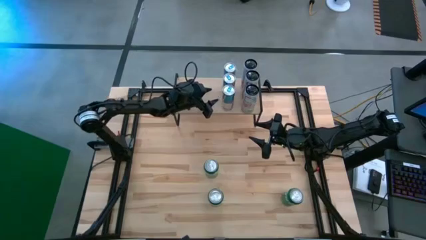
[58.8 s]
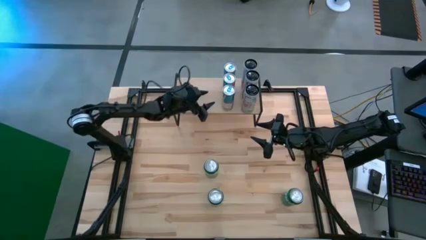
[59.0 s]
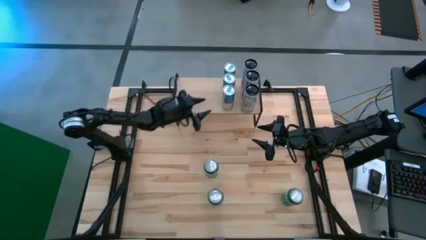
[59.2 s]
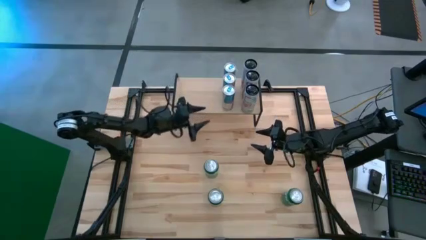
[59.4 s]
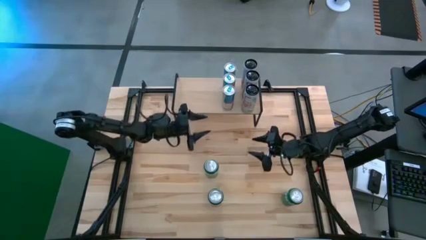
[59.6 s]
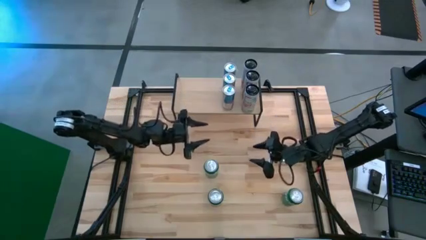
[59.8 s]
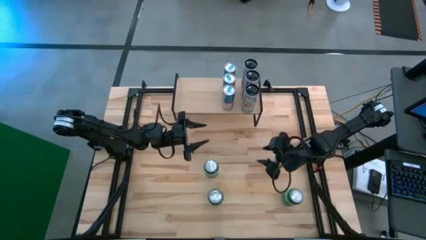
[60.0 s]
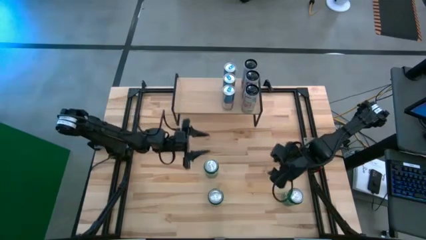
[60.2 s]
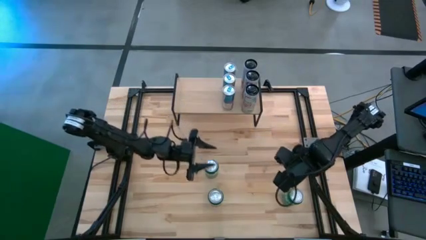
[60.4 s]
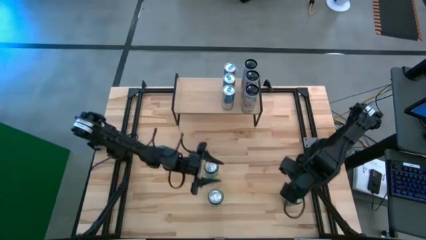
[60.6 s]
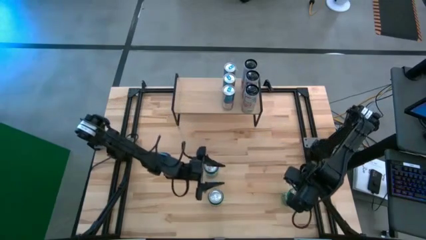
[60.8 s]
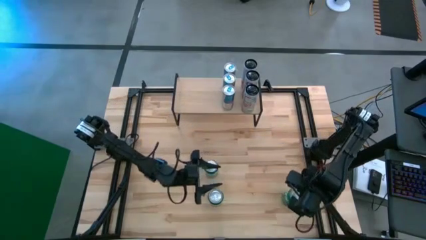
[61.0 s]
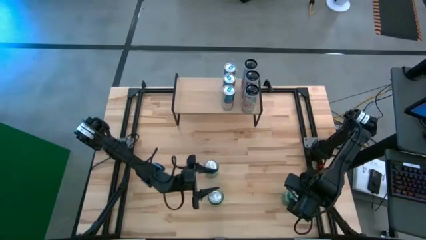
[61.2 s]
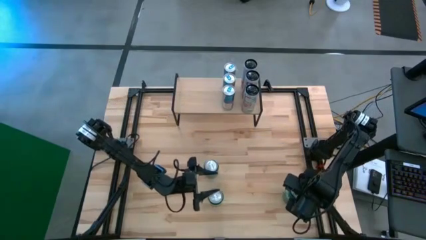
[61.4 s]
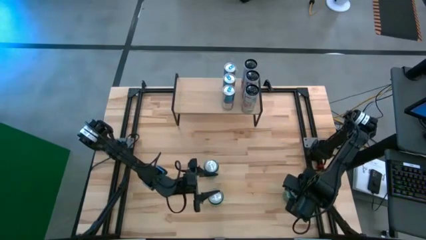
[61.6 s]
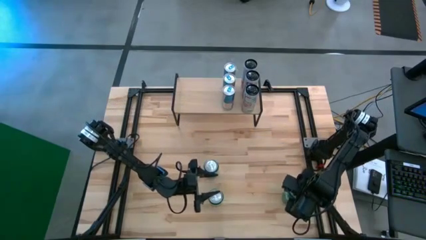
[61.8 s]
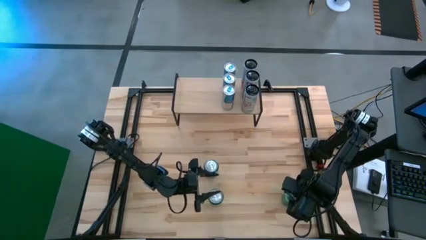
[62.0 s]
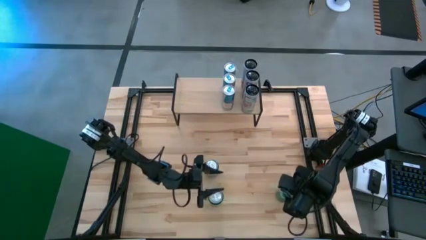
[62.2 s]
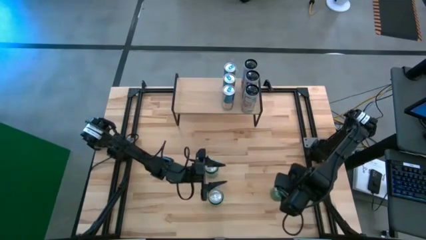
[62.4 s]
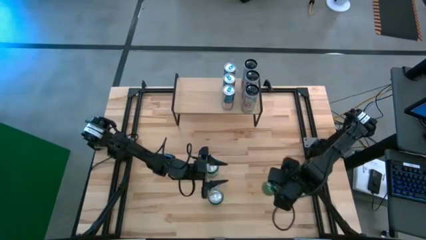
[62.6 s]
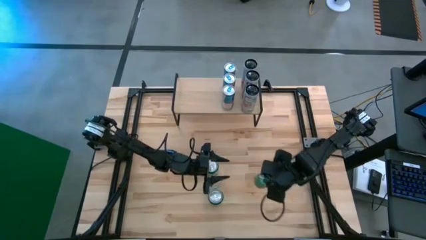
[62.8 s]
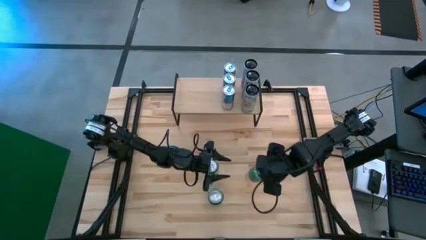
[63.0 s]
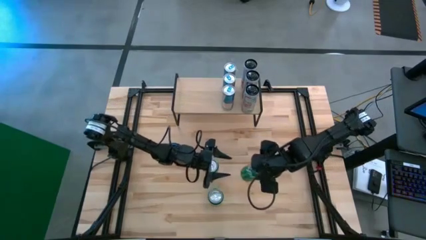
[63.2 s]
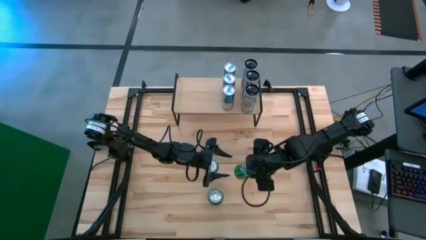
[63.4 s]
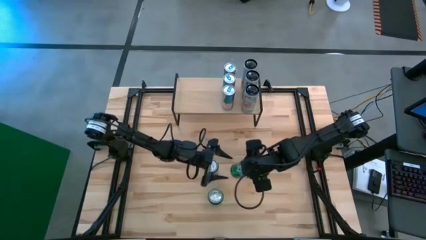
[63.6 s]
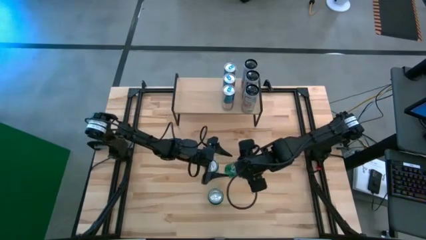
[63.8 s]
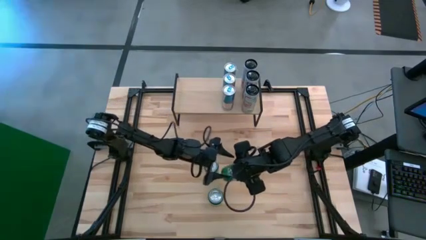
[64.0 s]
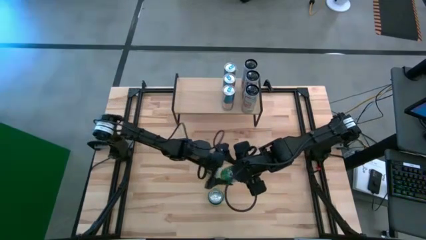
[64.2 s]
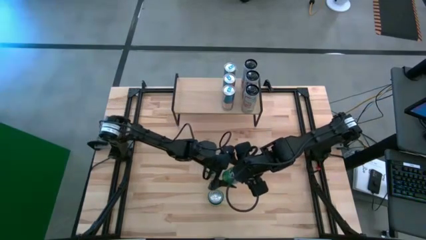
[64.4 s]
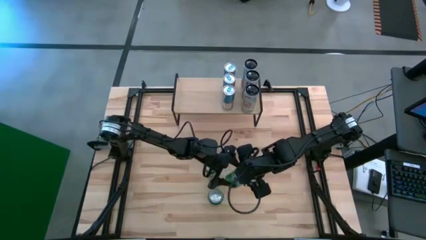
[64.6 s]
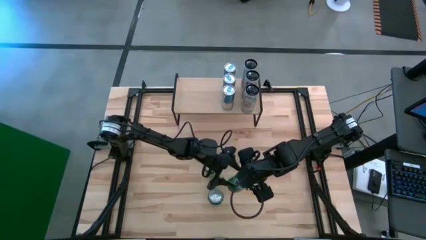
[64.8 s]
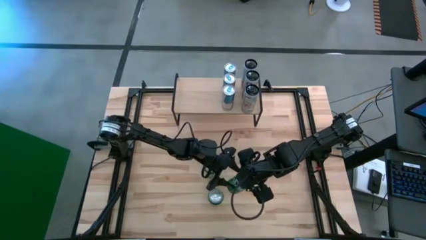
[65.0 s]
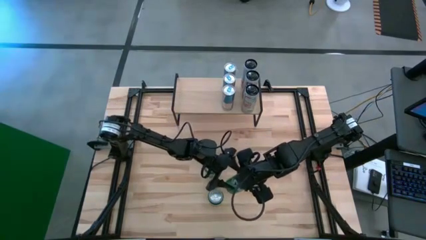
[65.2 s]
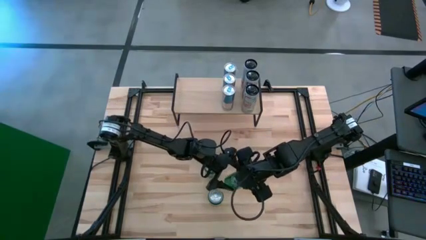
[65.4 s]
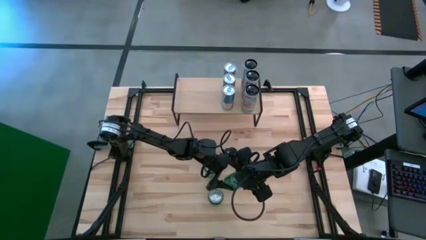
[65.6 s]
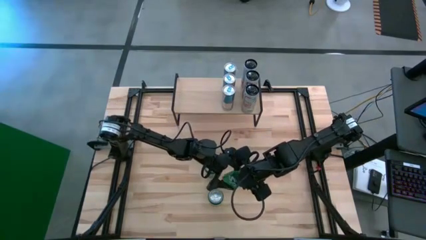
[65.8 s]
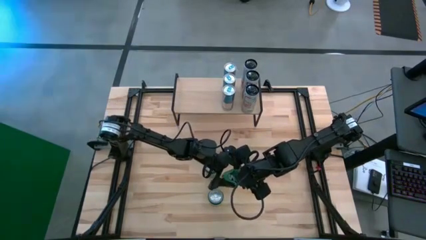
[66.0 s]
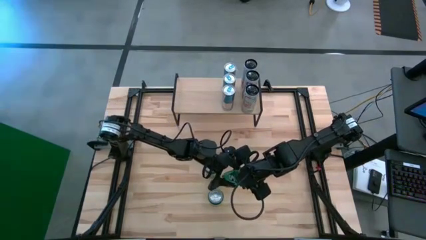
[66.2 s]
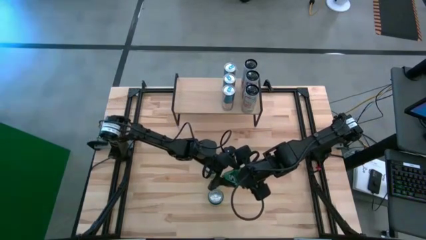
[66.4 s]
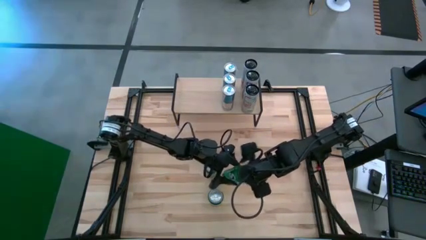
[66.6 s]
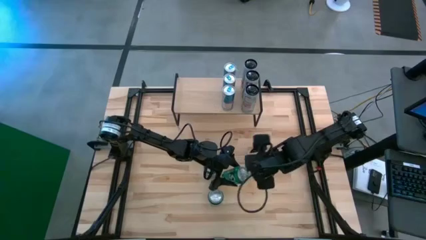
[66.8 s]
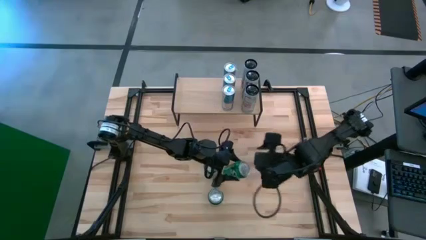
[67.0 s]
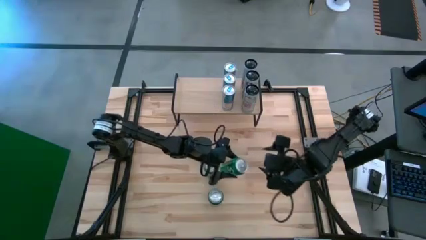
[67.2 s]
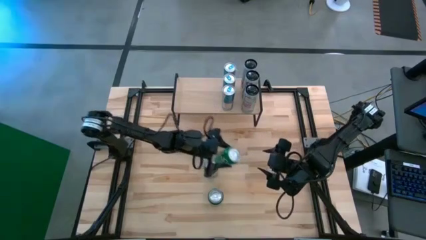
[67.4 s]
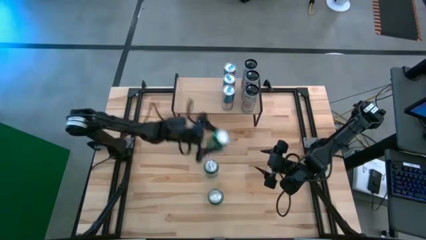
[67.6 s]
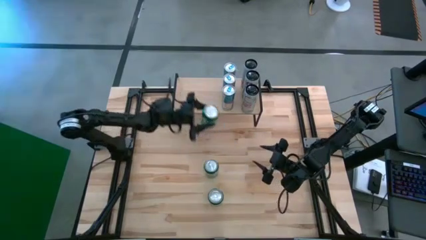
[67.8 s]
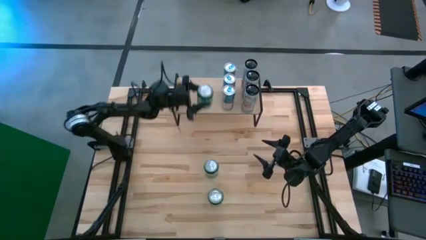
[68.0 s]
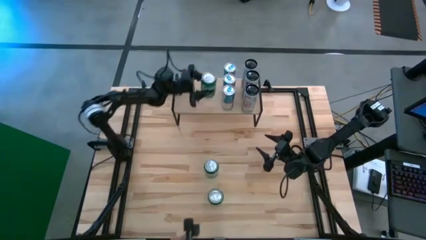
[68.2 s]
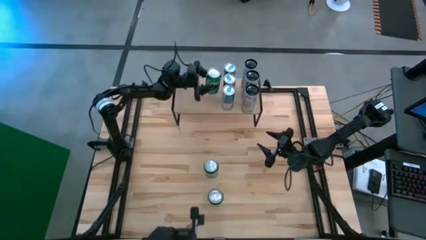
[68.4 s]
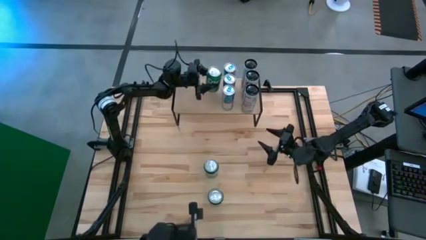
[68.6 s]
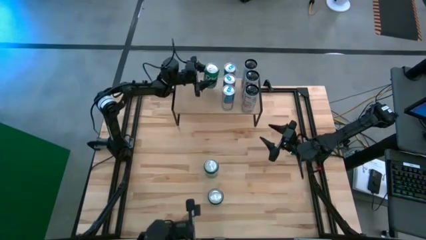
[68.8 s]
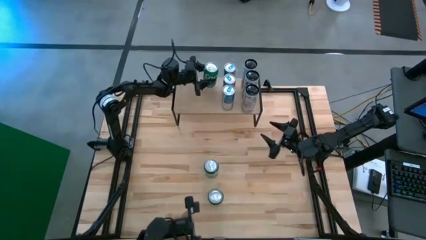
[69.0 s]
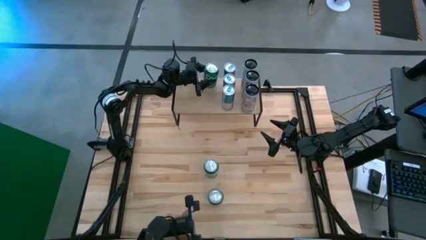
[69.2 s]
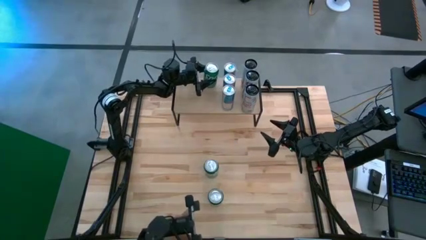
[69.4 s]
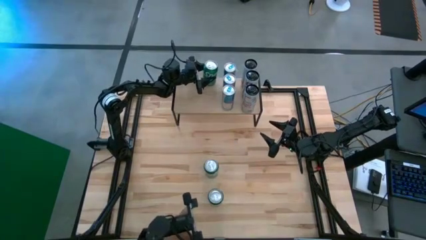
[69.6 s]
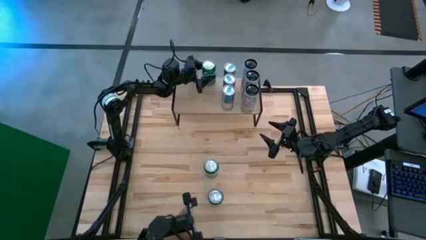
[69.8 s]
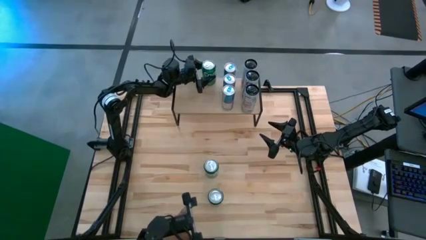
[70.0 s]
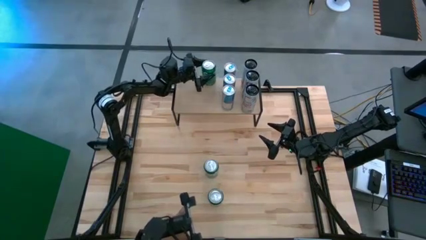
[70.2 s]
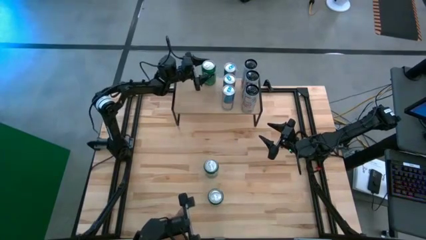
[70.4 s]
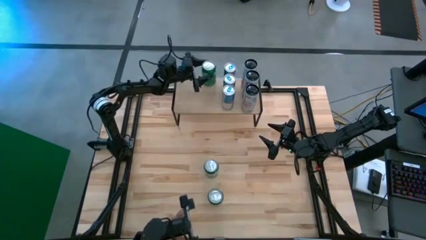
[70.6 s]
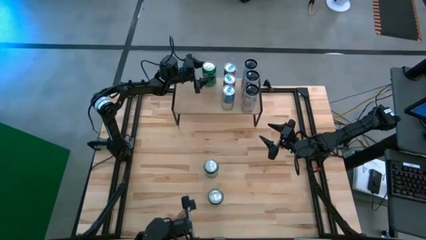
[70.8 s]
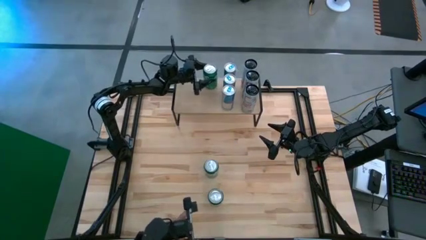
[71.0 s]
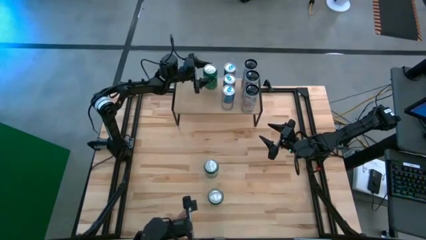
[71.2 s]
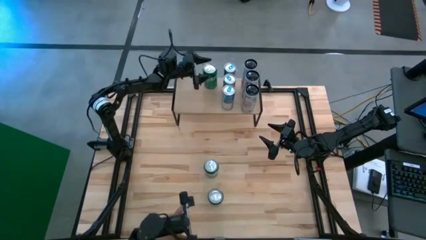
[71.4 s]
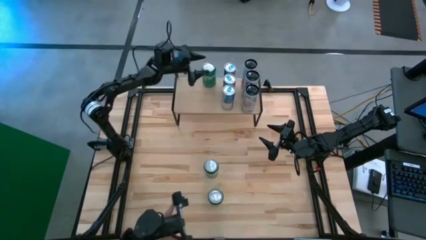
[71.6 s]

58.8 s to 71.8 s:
Task: Place canned beverage on shelf
Put the bottom right green soda can on the shelf

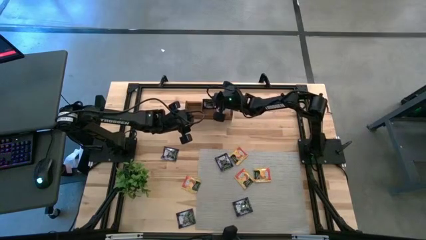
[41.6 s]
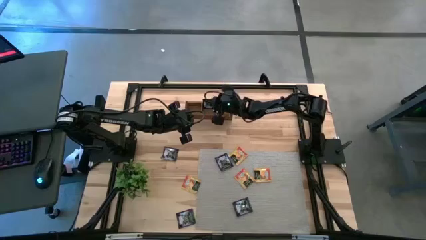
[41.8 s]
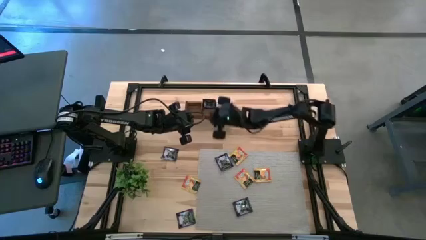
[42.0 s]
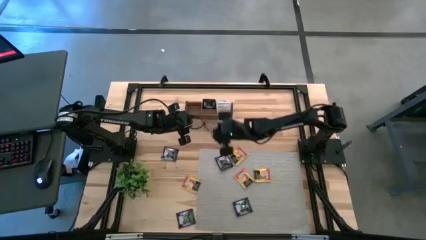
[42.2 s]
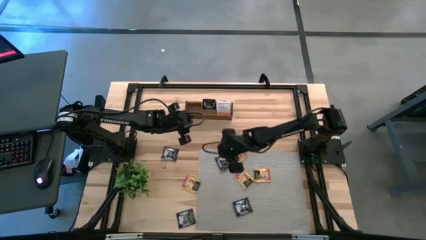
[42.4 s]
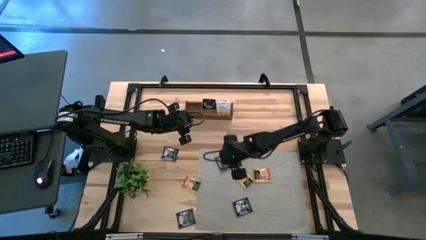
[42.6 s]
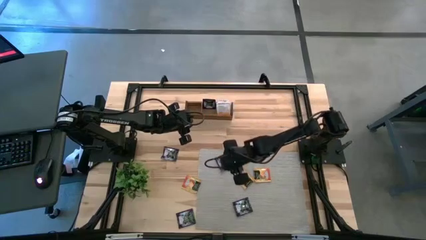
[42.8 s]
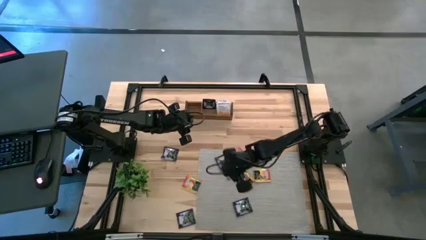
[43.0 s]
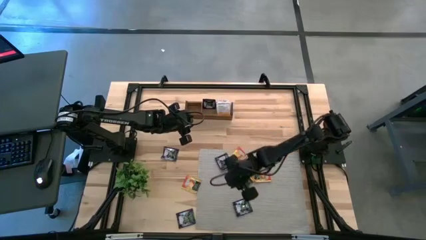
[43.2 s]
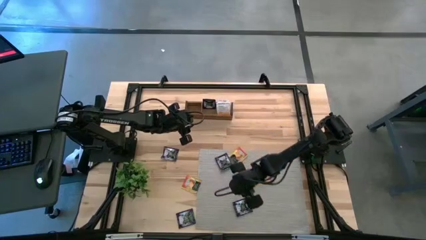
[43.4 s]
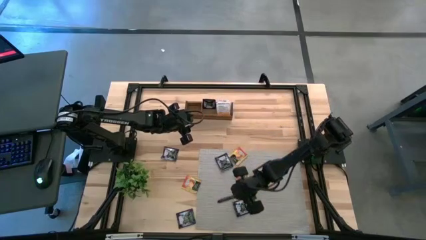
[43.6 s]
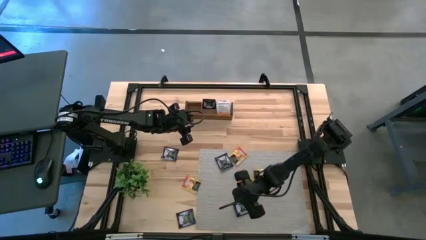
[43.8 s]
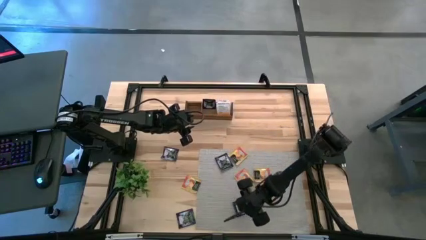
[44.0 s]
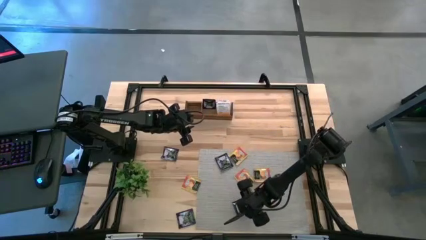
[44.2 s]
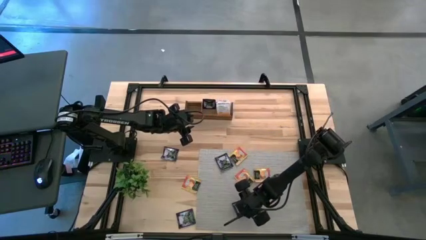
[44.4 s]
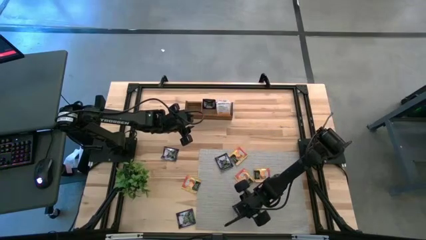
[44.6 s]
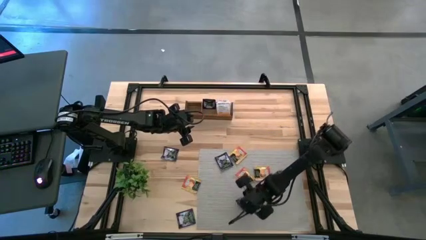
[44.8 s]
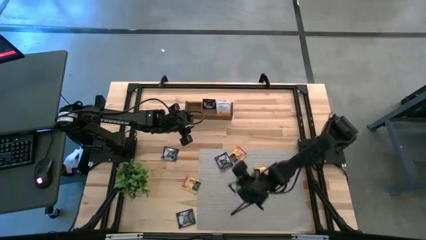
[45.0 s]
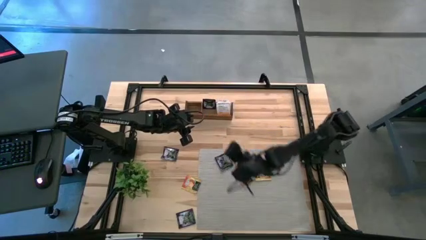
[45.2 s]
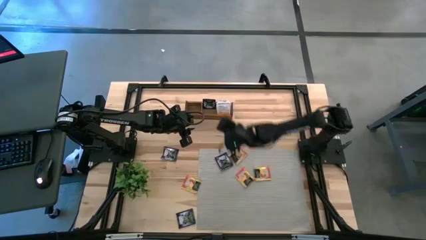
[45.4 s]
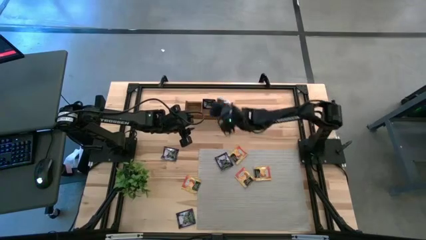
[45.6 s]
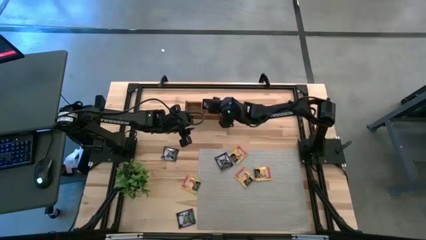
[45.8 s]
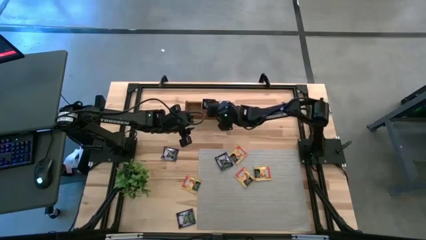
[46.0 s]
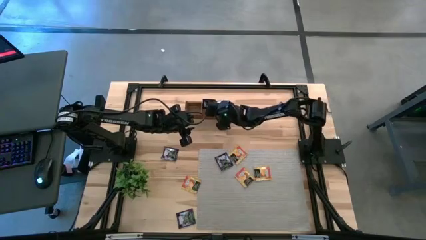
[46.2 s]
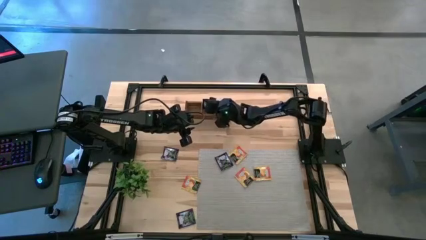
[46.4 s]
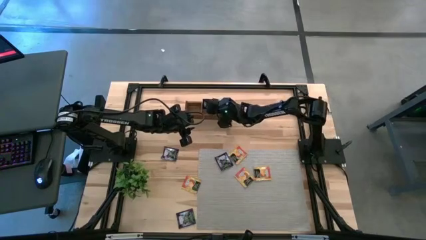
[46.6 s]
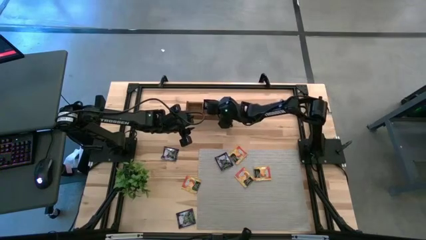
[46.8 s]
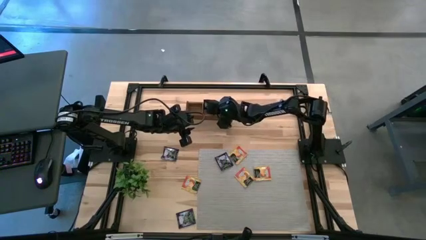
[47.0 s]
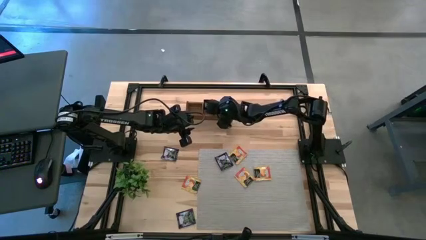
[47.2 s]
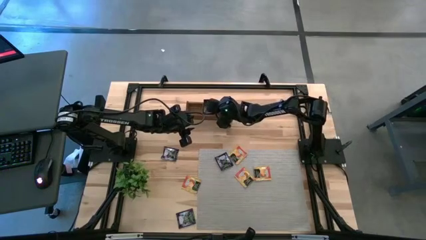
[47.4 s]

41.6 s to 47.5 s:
Task: Pick & Place Tea
Put the black tea bag into the middle section of the wooden organizer
